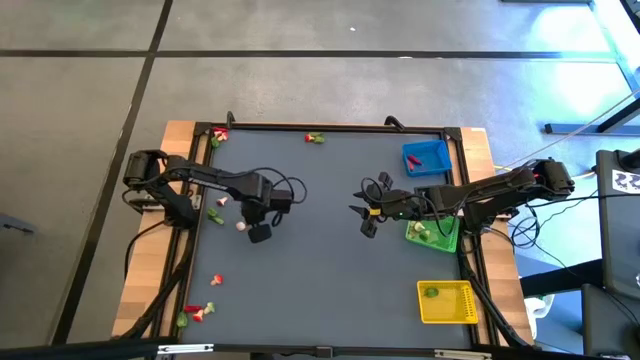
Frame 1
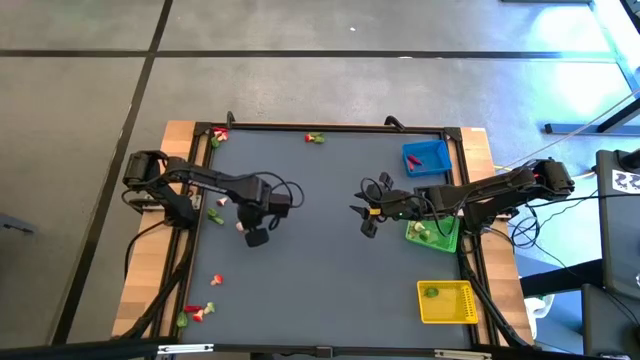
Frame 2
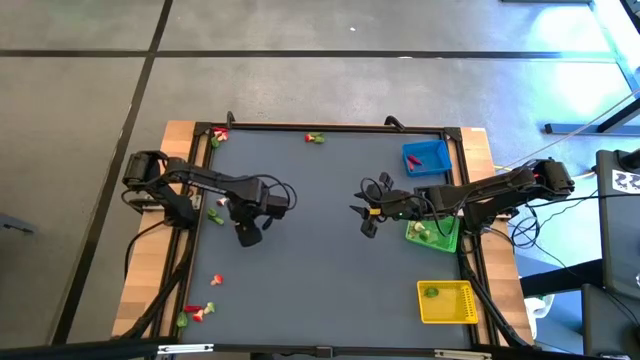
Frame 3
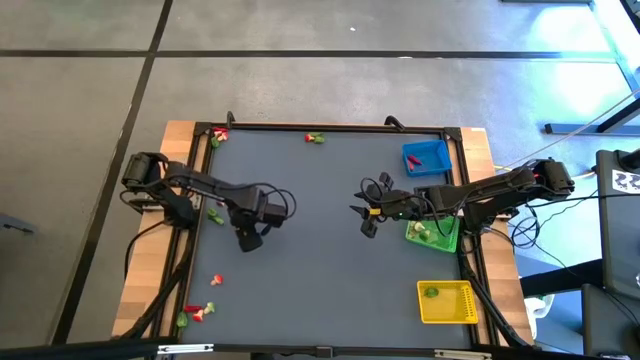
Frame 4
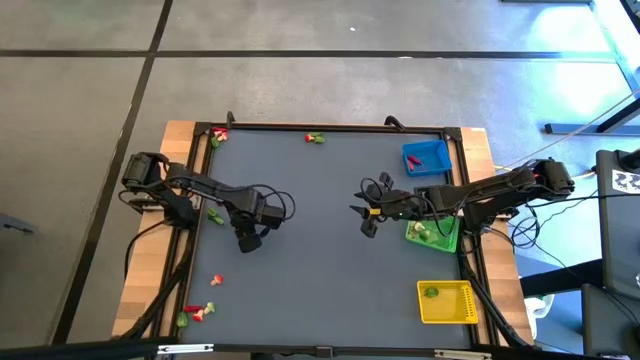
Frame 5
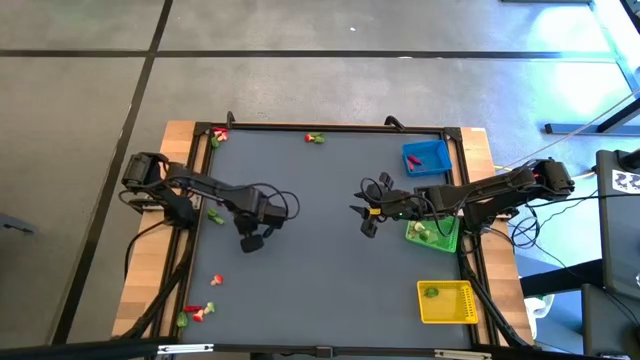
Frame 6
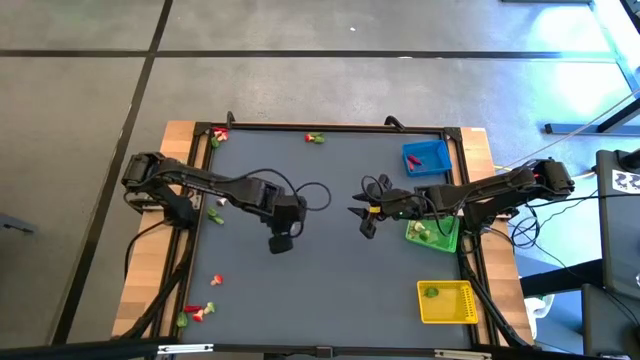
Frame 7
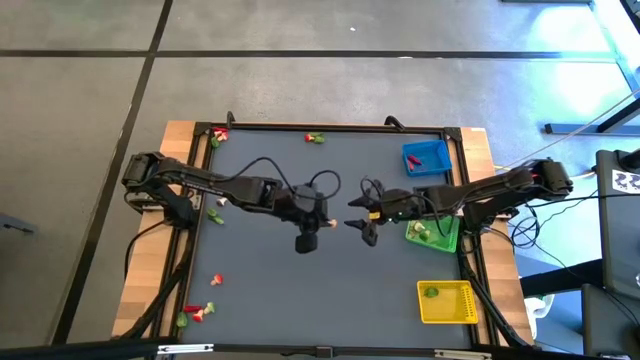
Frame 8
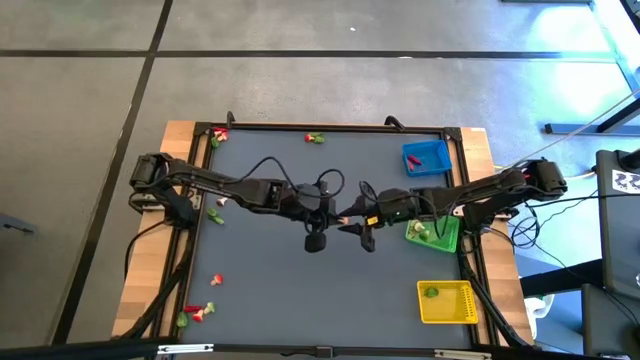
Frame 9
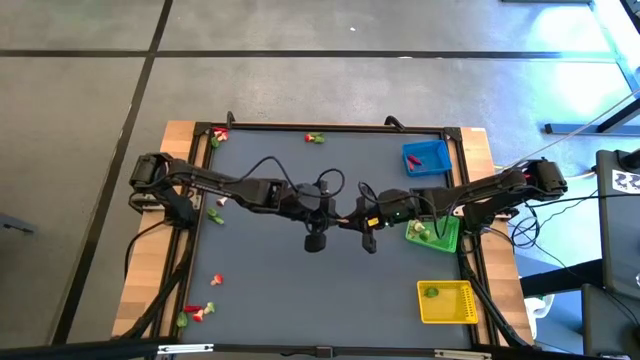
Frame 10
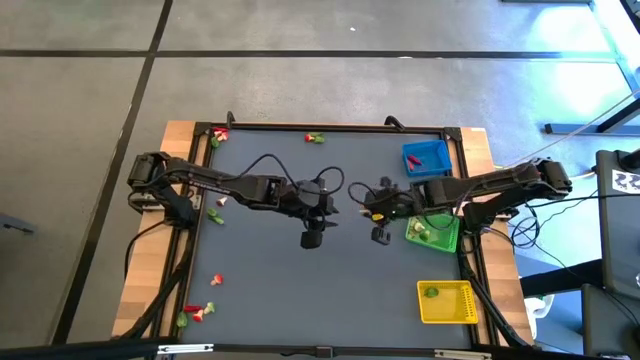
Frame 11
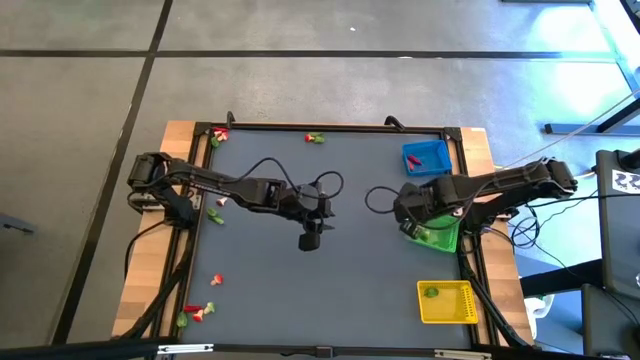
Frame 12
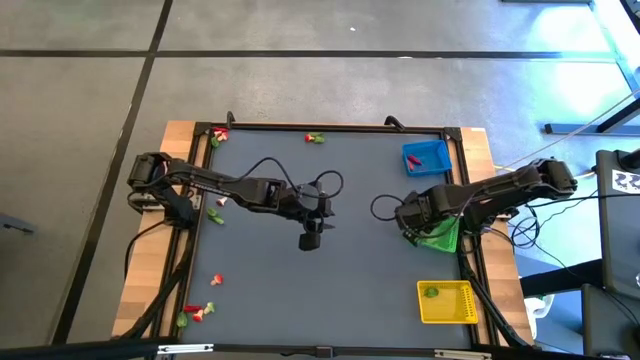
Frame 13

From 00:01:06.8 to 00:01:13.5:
Task: Sort produce into baskets
Put the brown mushroom into the green basket

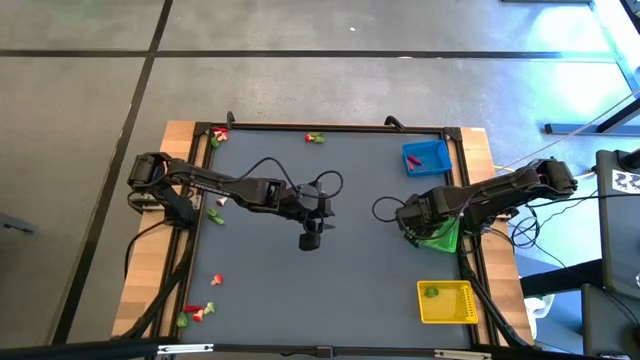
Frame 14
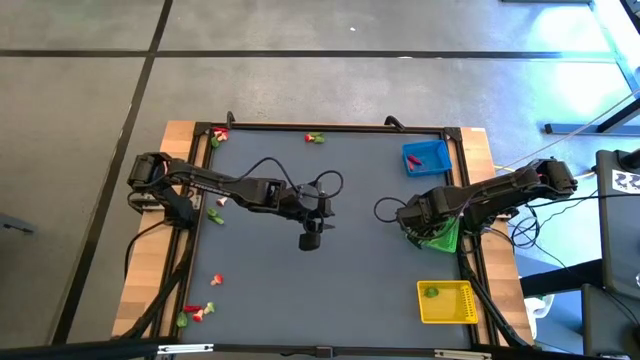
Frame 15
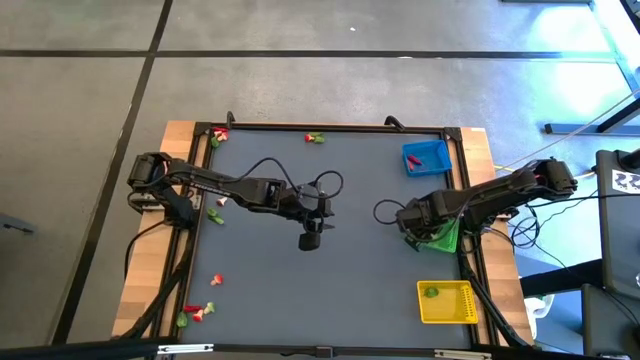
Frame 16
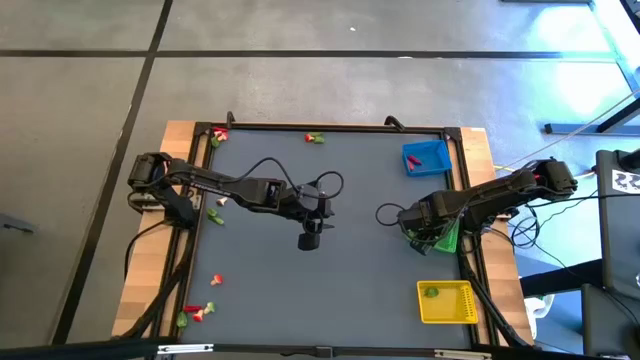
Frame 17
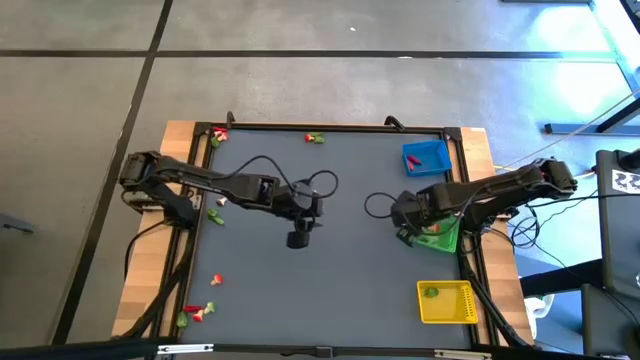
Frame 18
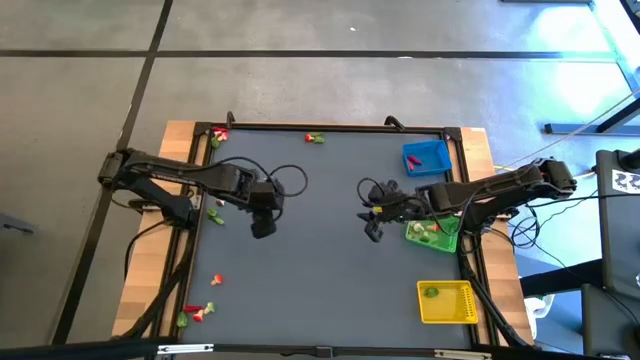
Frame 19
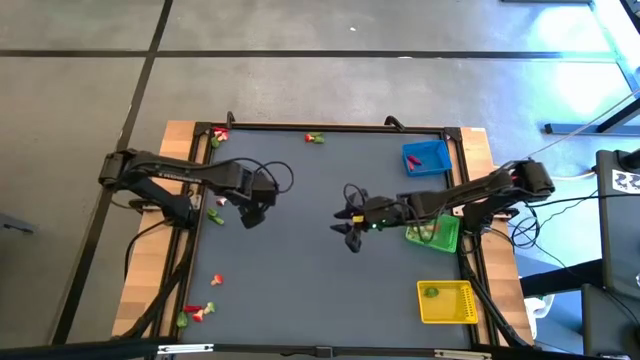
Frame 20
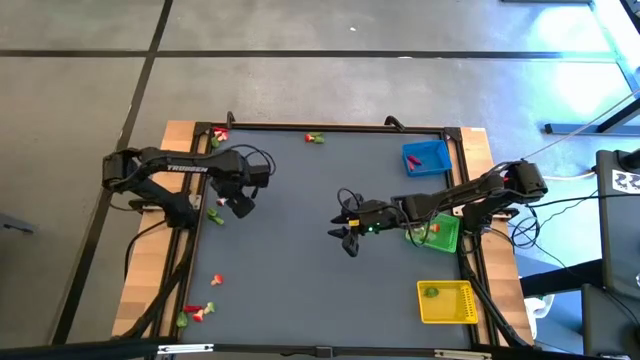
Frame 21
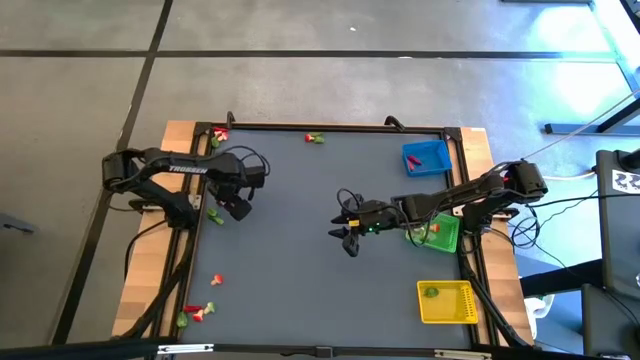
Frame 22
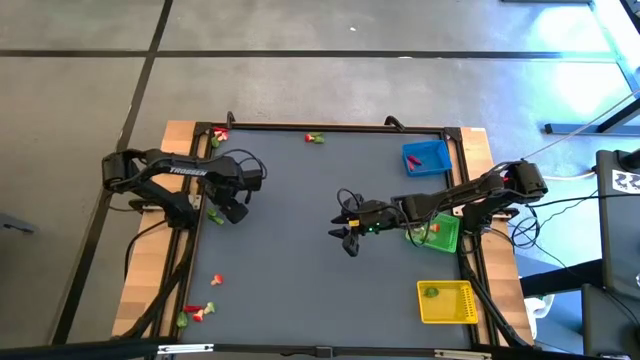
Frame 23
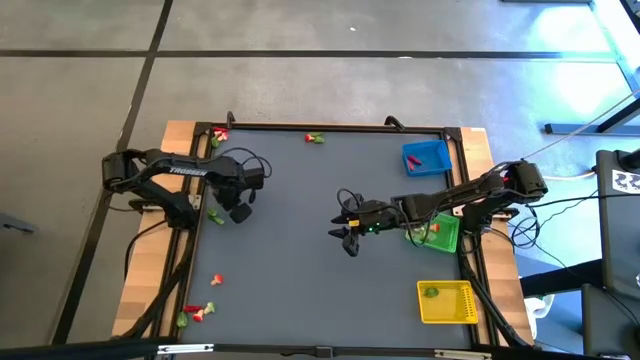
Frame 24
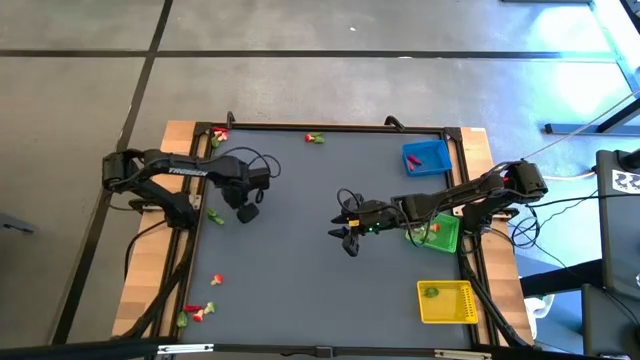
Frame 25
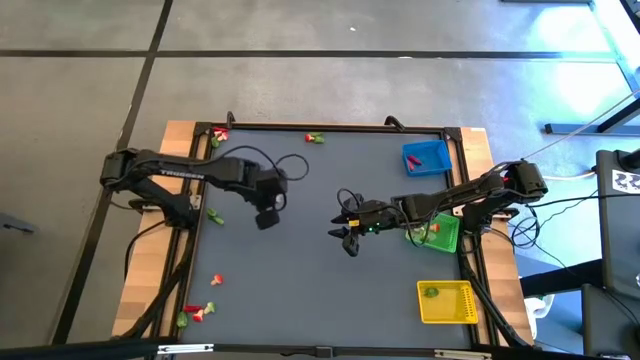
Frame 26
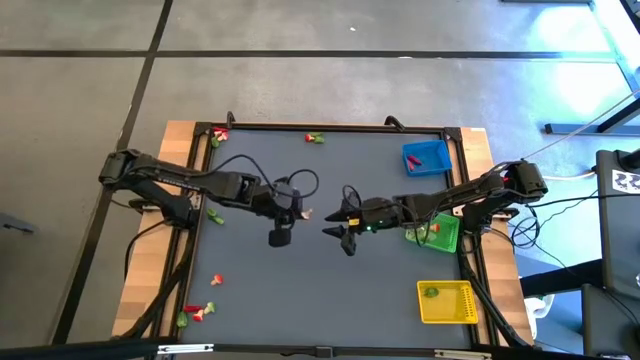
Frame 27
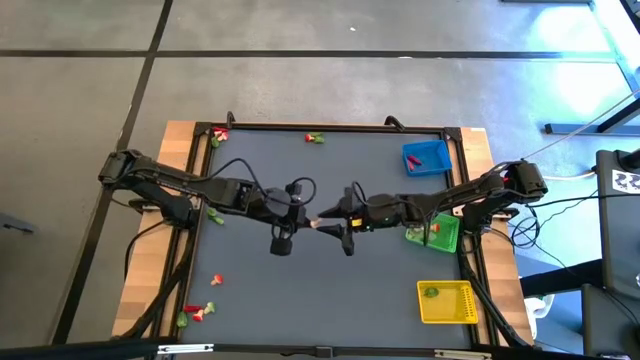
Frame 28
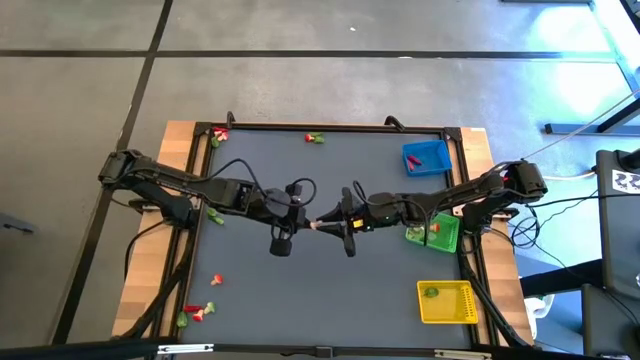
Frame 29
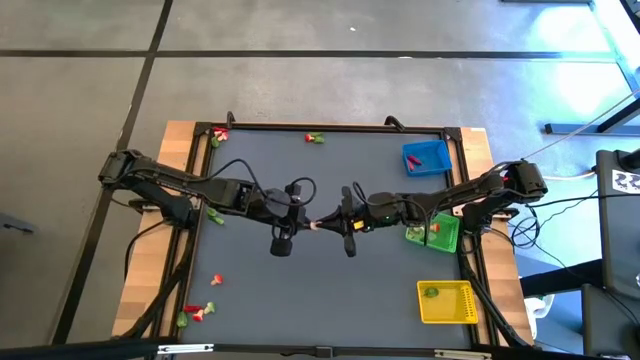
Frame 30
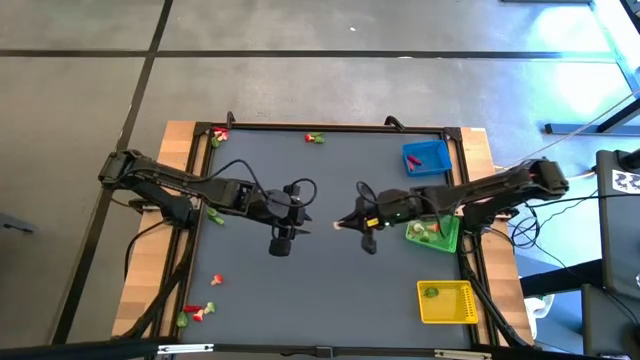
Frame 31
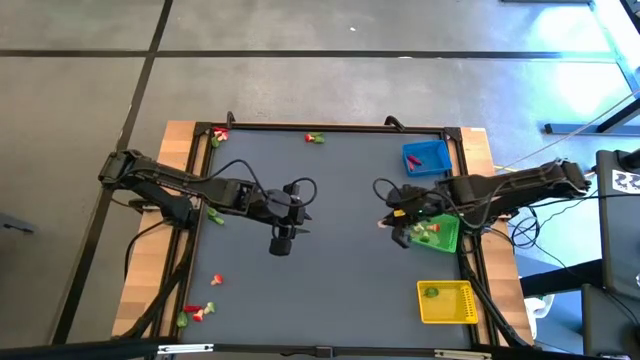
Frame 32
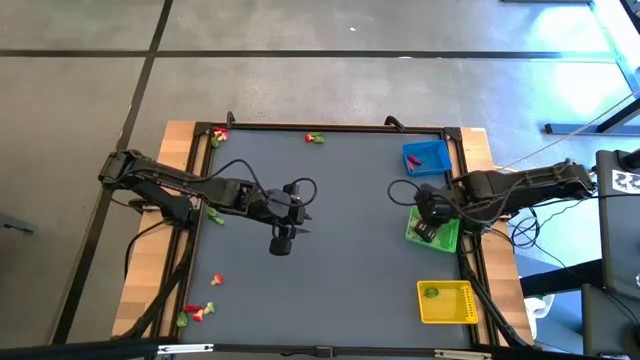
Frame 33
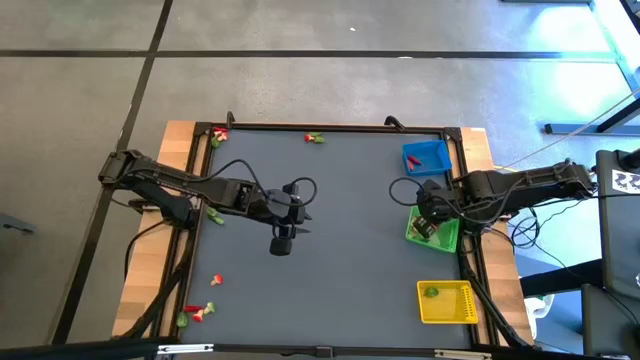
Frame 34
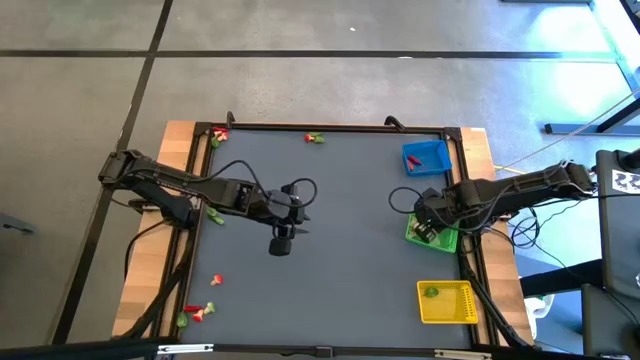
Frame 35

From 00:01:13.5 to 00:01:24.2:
Put the brown mushroom into the green basket

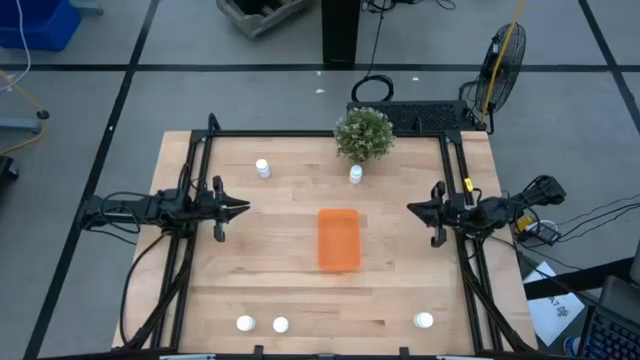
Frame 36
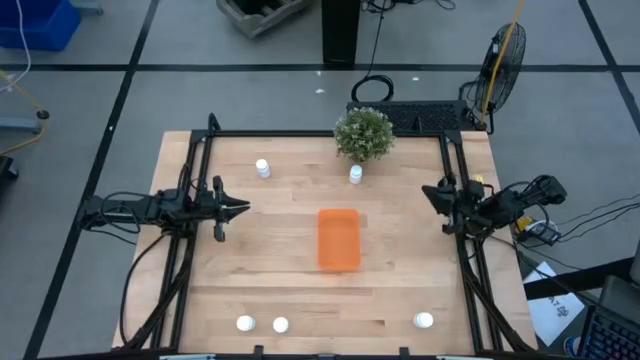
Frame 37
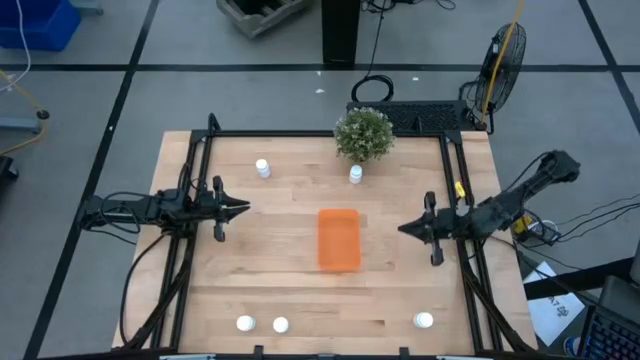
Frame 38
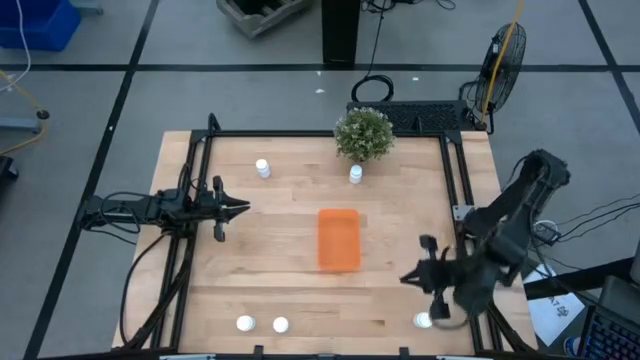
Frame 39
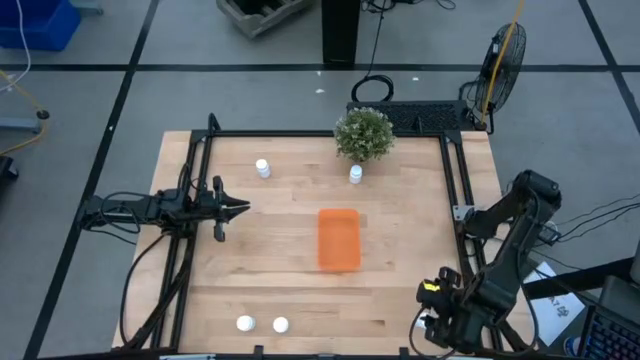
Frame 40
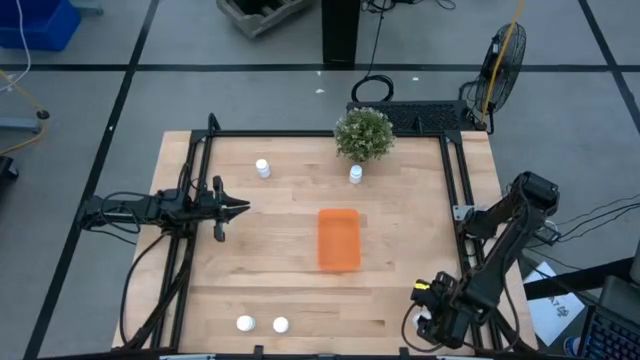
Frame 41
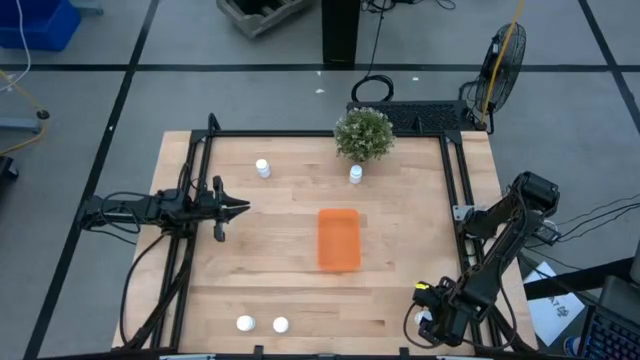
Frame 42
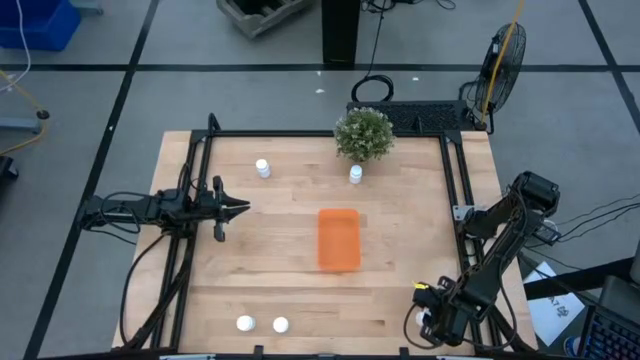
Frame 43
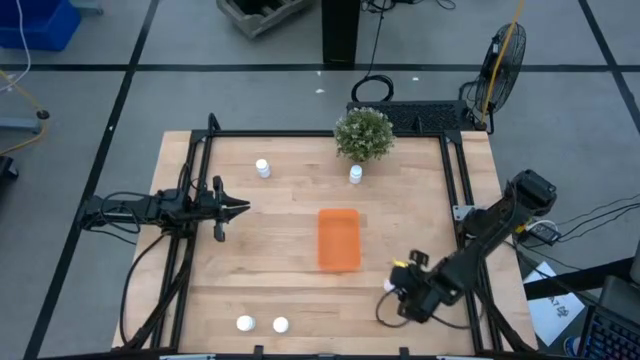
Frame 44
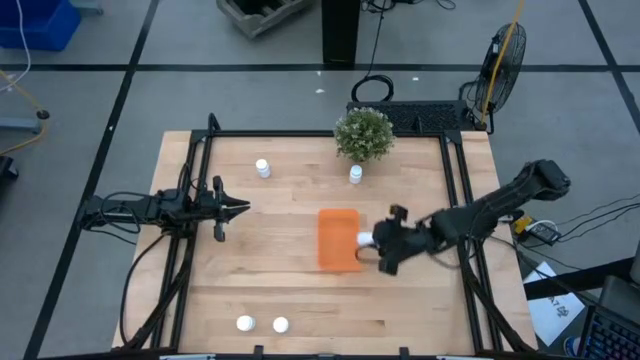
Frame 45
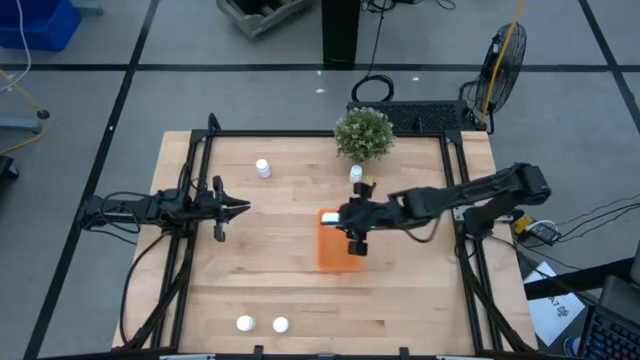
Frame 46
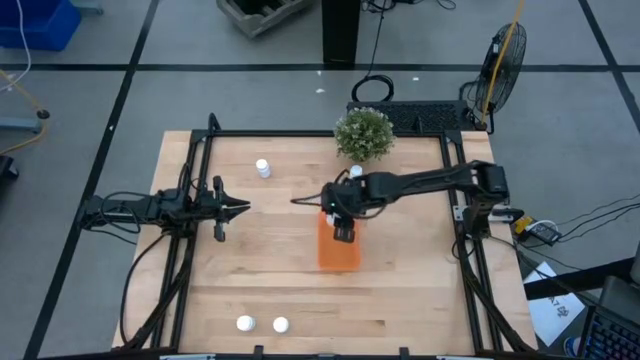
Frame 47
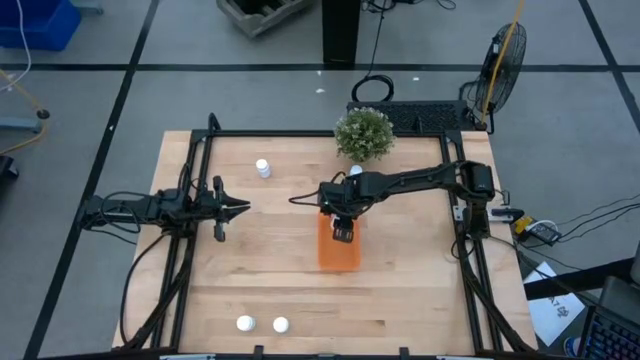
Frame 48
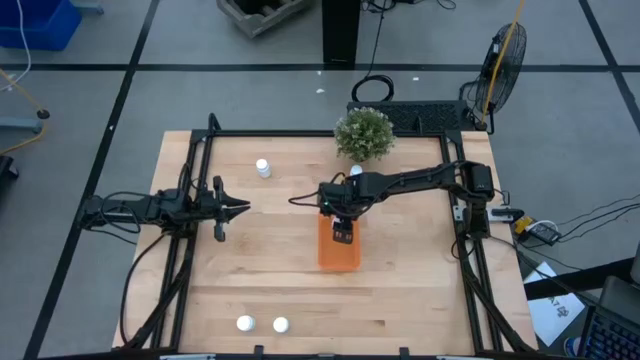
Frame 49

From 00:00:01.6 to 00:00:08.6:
Task: Pick and place pill bottles into a basket
Put the white medicine bottle into the orange bin
